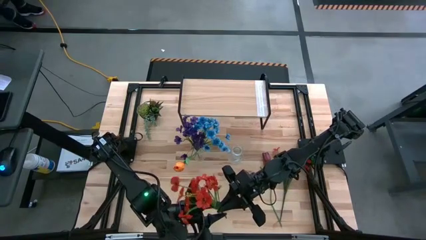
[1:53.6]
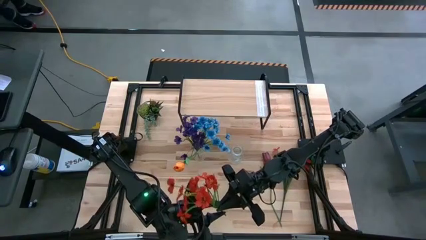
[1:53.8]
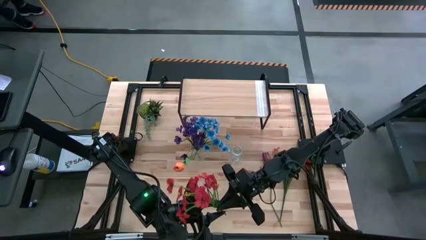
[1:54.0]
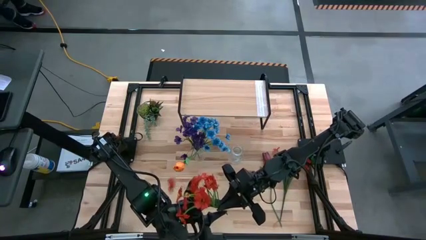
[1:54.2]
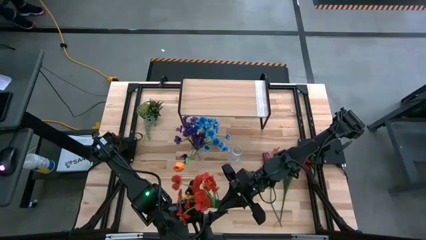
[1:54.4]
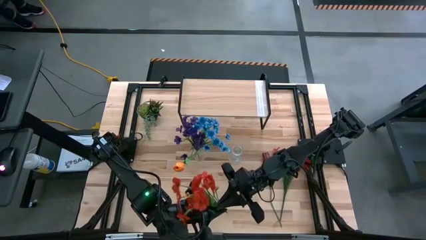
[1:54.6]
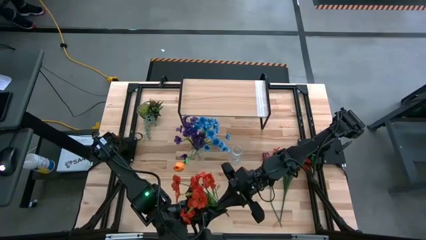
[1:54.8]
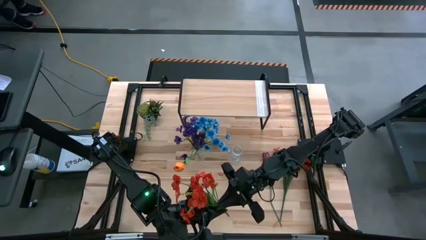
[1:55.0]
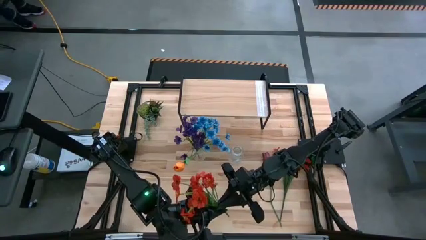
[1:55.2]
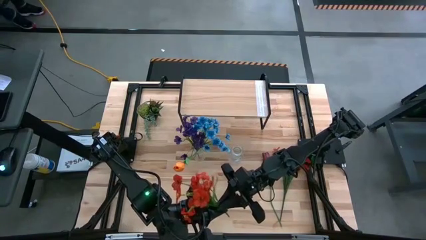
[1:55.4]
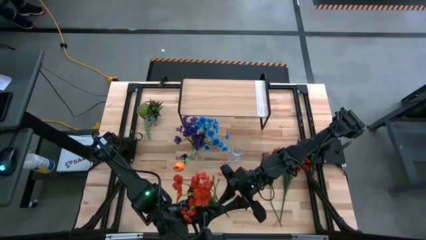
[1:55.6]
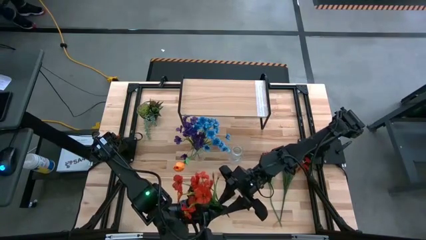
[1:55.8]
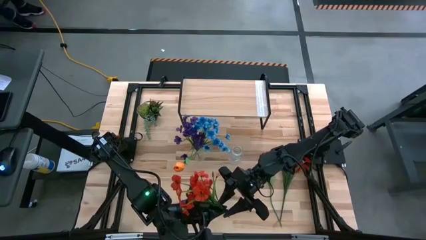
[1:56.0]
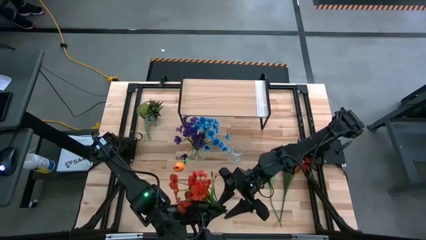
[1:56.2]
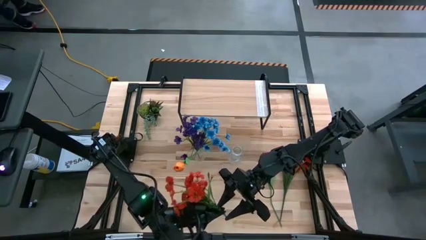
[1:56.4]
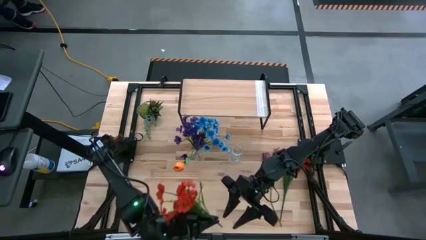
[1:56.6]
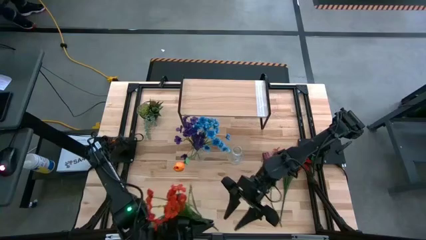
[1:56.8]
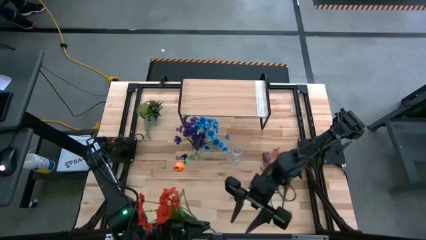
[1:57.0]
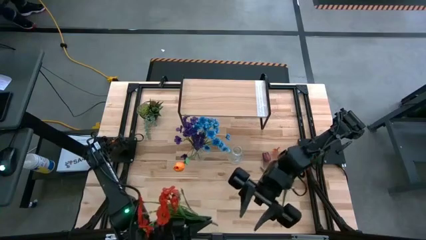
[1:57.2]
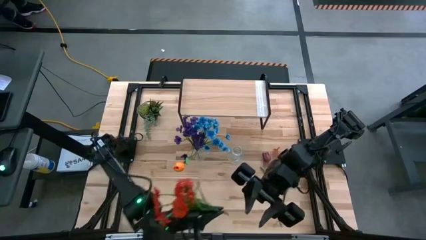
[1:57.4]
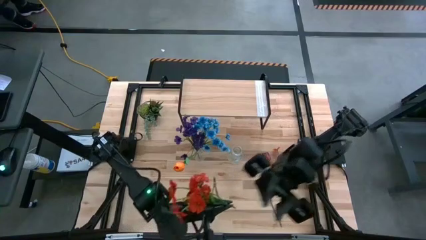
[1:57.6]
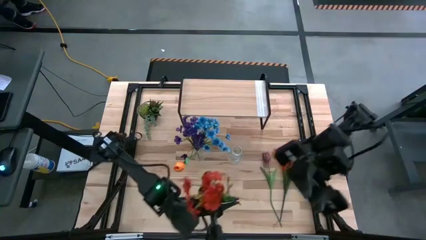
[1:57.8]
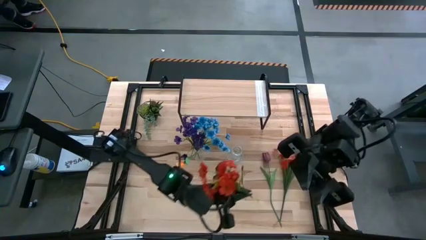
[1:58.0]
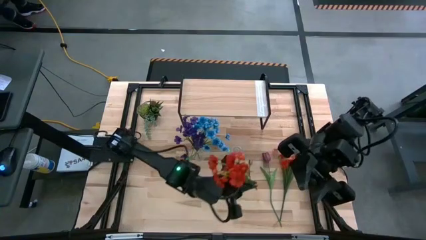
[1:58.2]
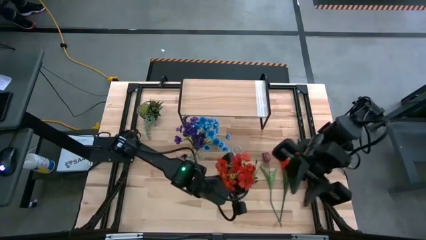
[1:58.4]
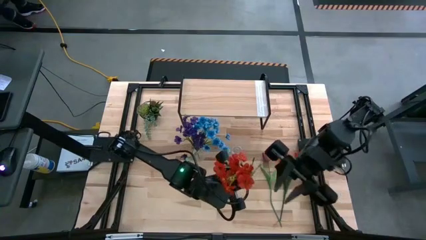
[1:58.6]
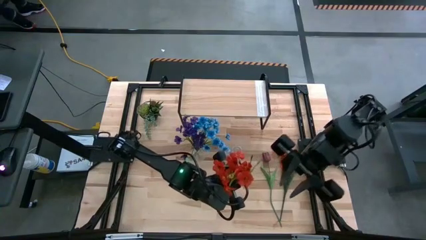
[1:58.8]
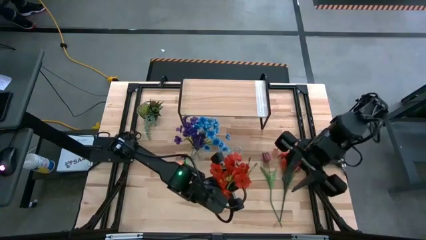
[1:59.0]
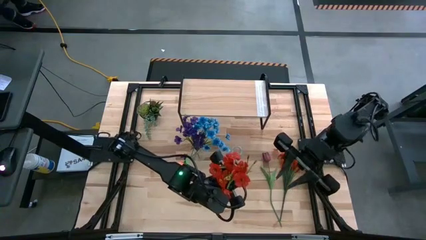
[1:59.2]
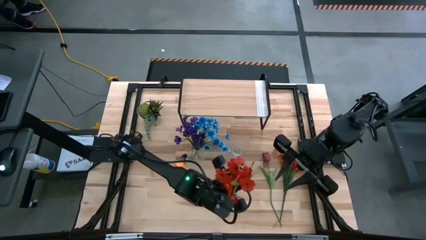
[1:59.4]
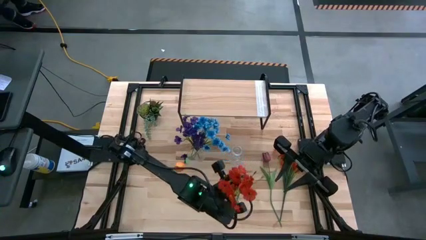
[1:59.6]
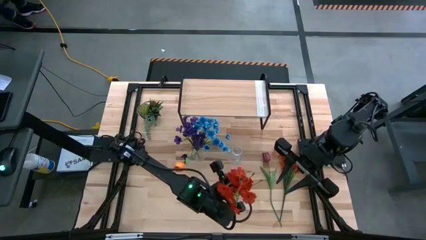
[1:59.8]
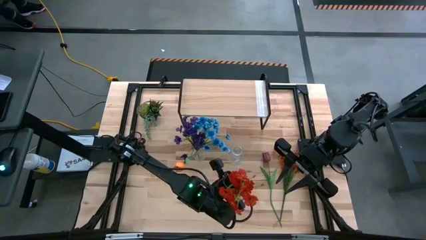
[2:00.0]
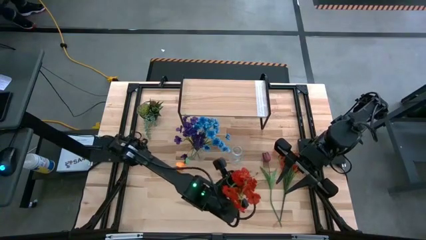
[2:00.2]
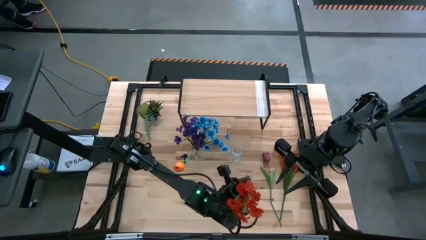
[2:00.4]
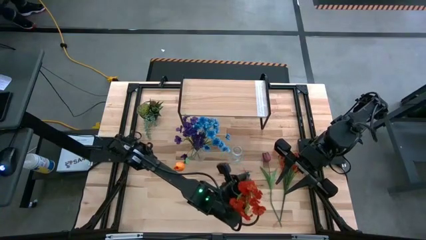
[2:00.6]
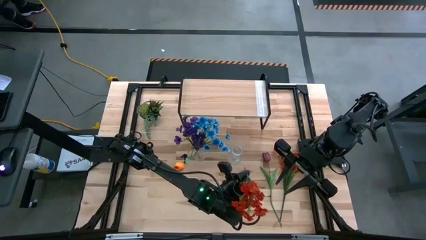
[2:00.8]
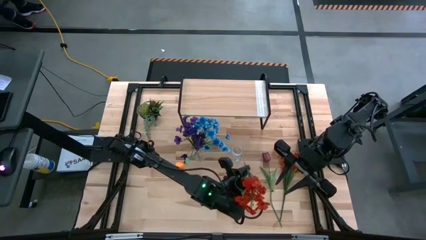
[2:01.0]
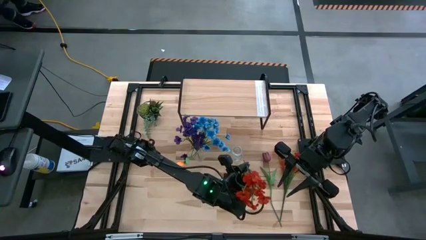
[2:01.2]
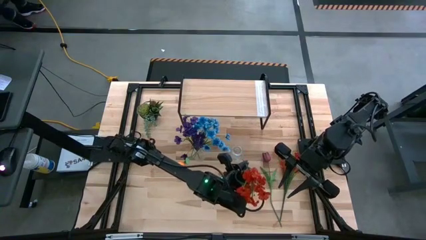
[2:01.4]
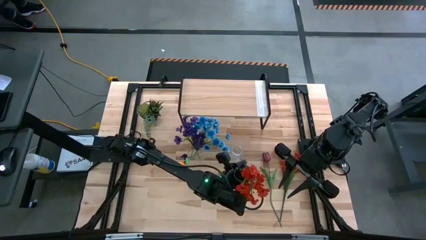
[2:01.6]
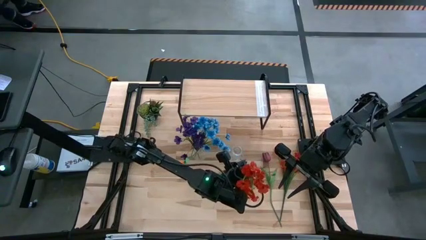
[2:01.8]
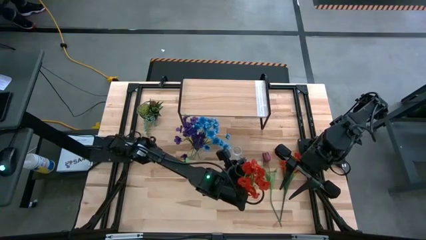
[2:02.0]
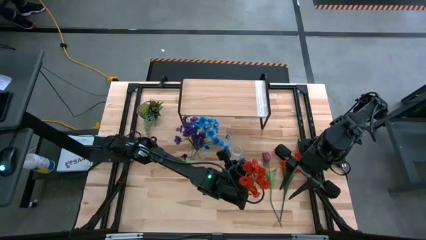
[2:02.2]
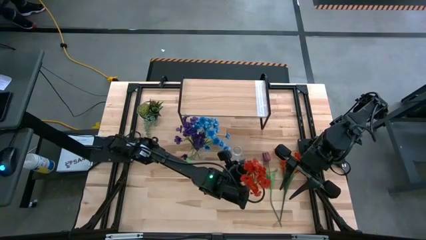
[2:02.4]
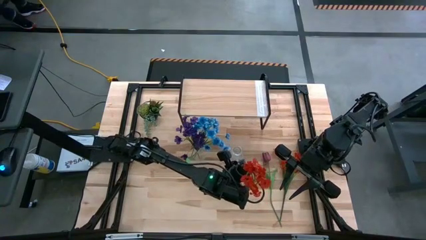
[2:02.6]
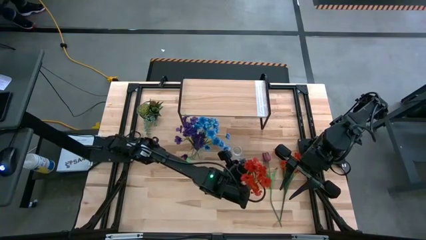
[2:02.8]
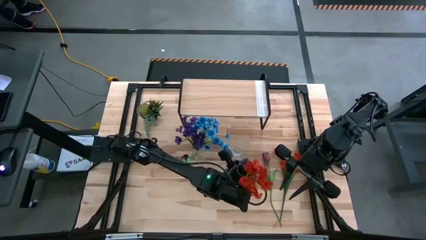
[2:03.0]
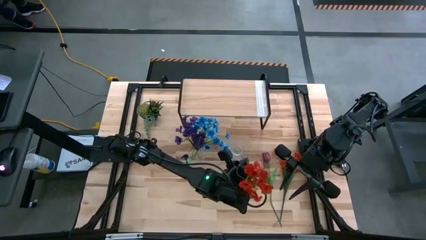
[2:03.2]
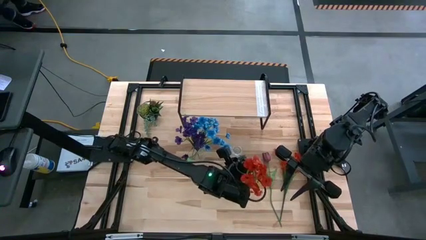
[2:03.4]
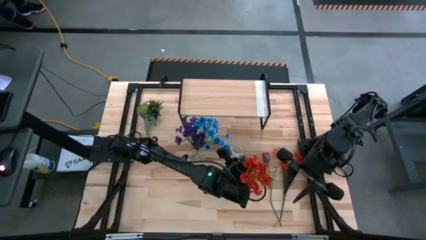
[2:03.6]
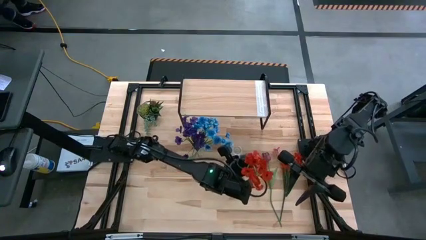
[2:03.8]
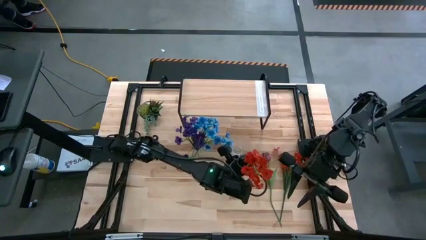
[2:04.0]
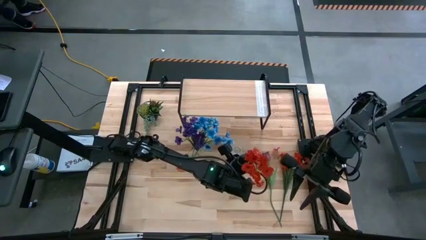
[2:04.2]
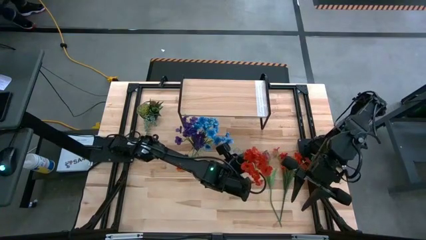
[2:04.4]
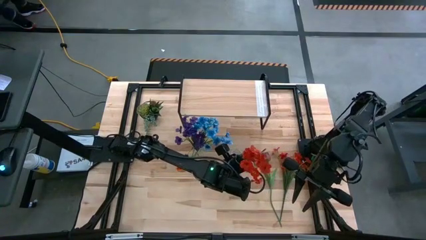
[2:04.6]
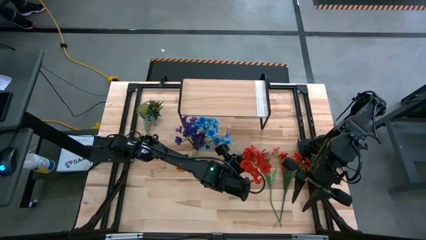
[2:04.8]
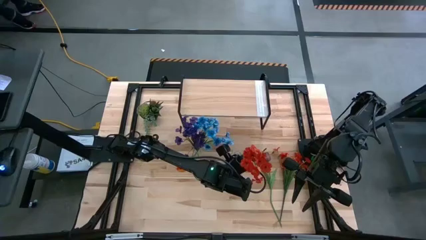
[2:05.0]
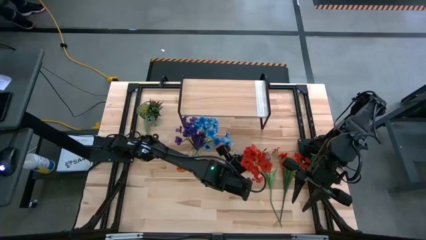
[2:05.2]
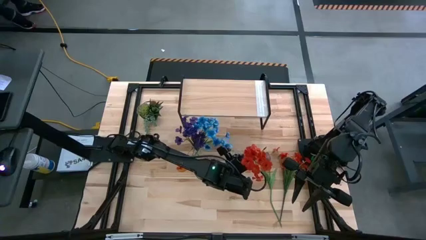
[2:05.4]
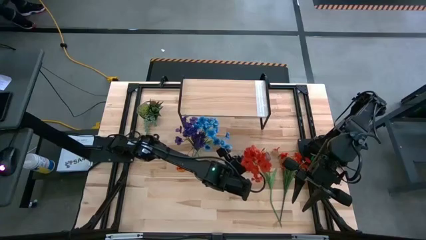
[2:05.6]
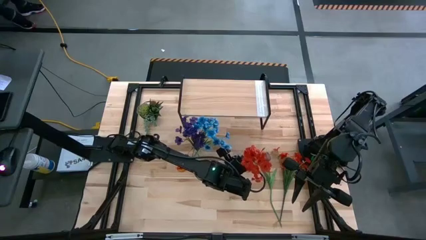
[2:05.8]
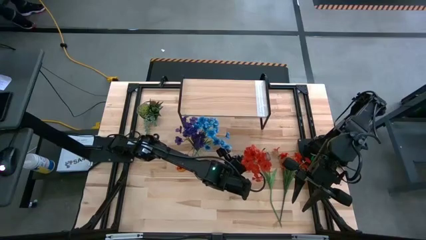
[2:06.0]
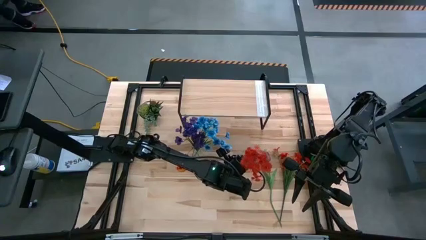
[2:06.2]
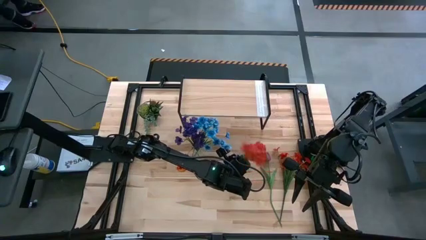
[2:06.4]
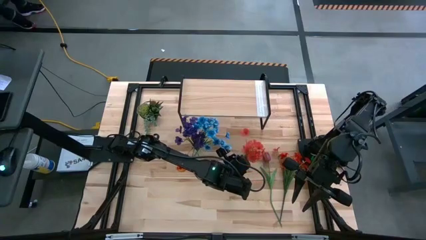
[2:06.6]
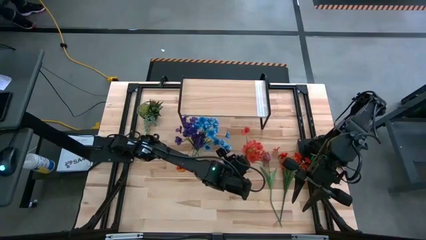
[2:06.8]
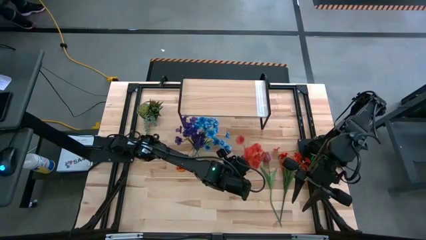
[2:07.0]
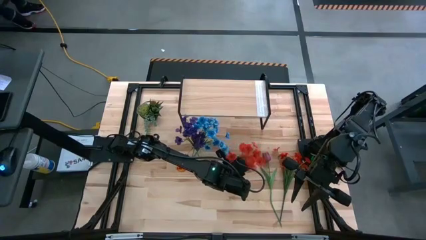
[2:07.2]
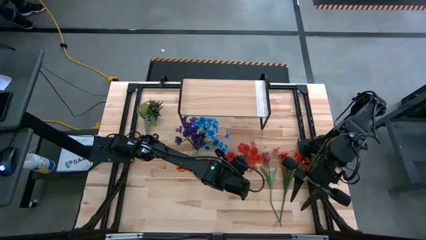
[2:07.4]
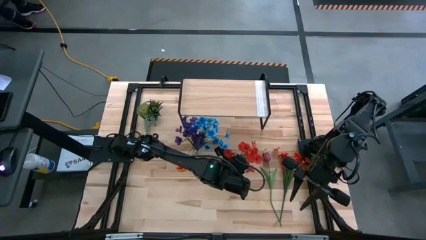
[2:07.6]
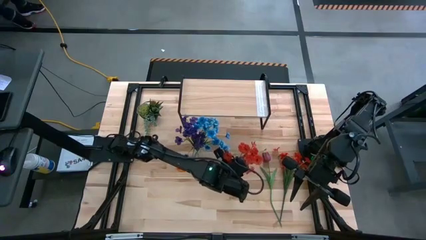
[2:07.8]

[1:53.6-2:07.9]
Task: Pick and place flowers into a vace then onto a shelf
Put the left red flower into the right transparent crystal vase
